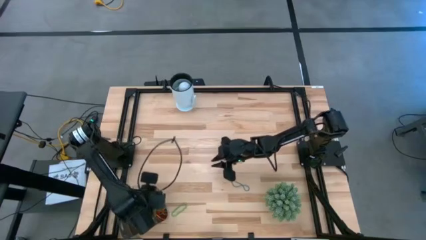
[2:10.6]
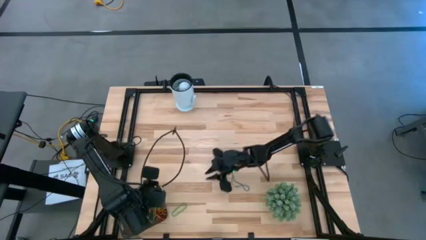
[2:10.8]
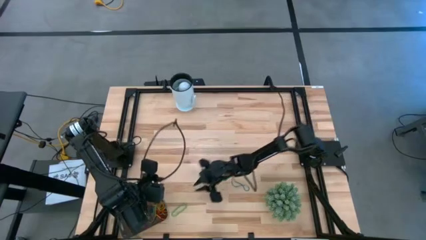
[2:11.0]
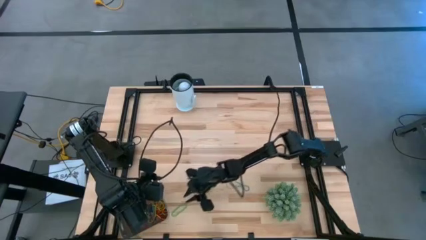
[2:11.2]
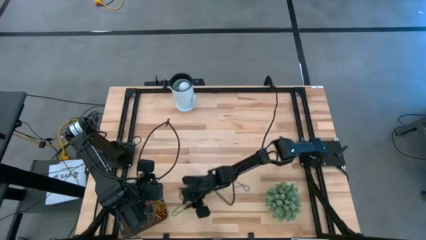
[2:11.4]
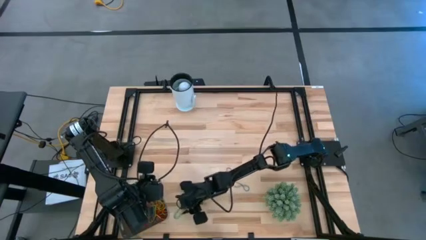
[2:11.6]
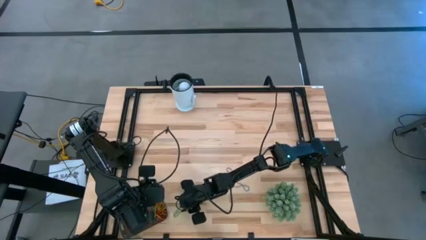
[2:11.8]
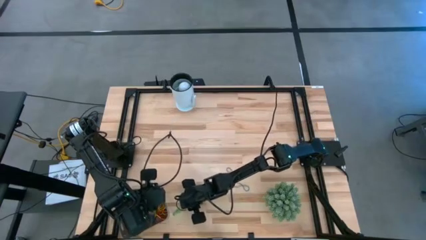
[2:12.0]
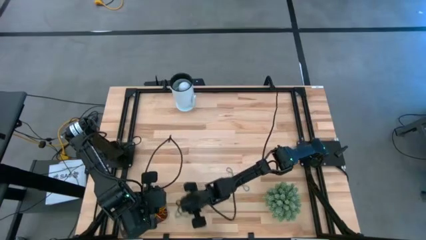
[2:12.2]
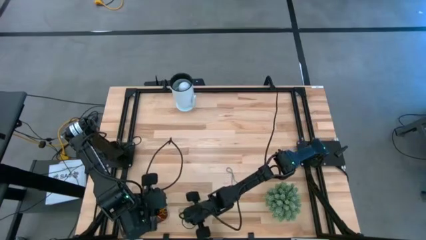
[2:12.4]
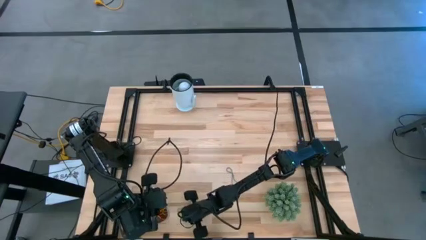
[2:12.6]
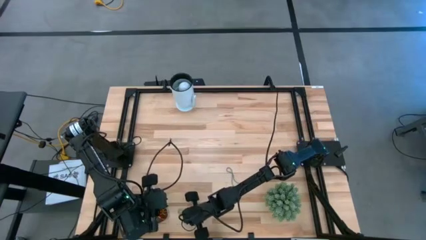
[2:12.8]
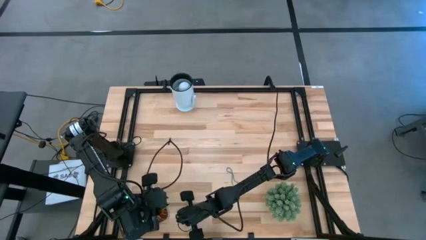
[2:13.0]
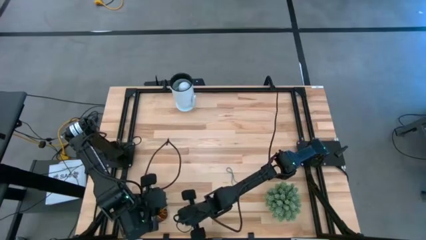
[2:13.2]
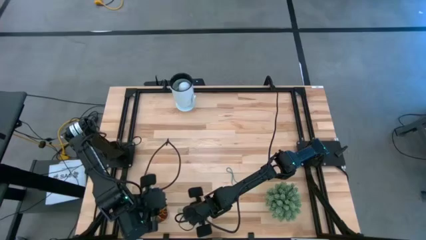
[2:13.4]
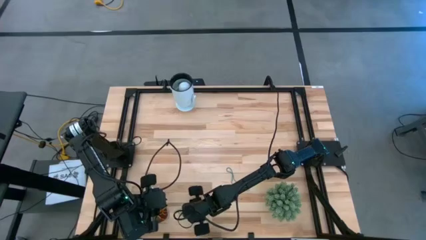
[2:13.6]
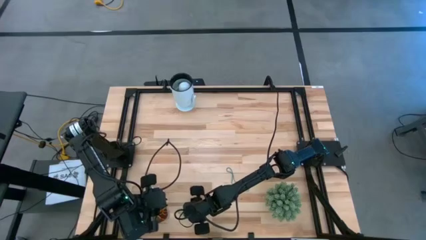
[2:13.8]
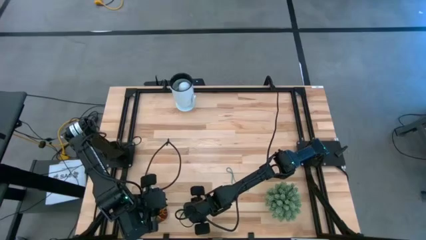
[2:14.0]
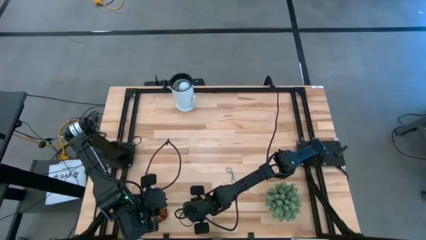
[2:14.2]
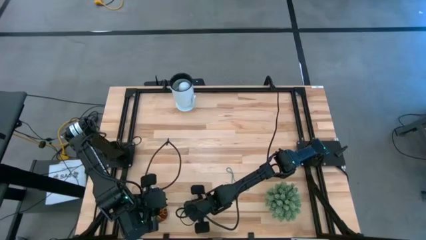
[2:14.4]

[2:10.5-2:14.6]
Task: Pick and place items into bin
Put the green rubber band into the black bin

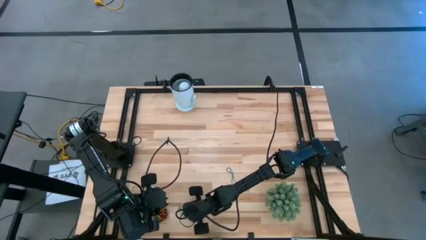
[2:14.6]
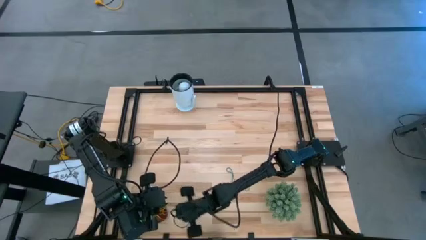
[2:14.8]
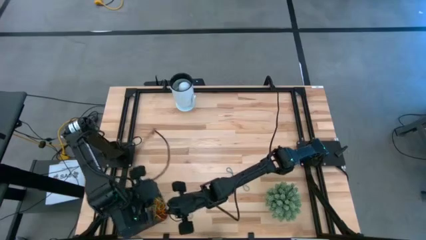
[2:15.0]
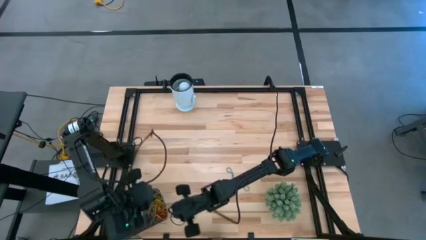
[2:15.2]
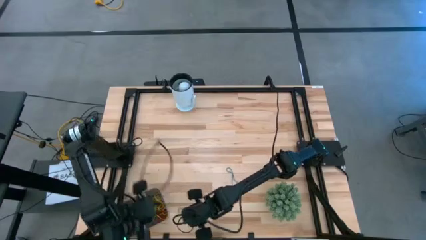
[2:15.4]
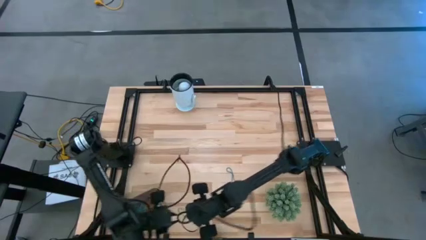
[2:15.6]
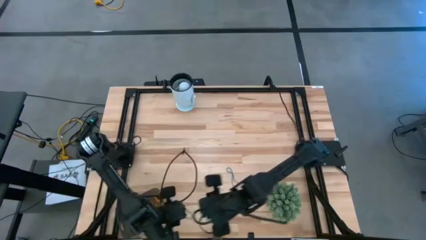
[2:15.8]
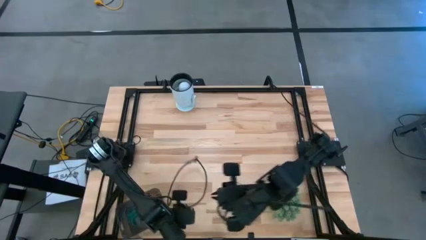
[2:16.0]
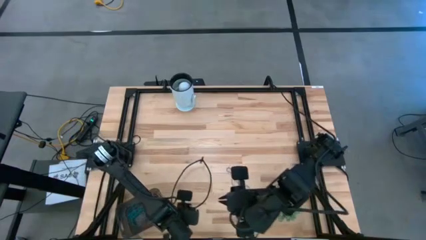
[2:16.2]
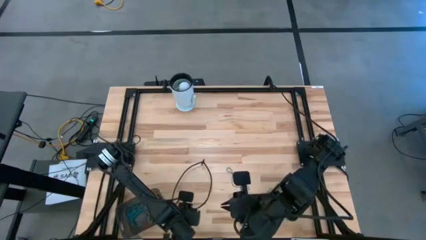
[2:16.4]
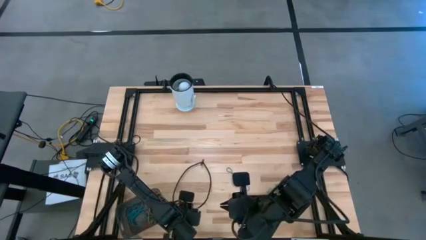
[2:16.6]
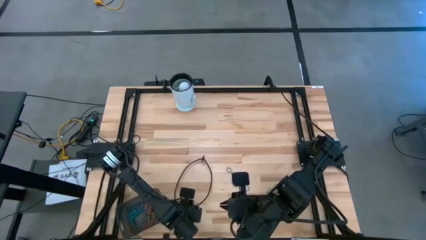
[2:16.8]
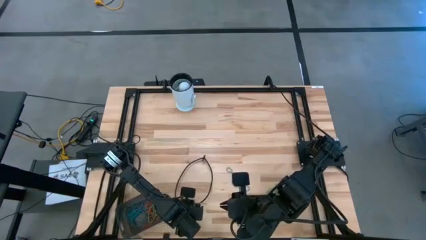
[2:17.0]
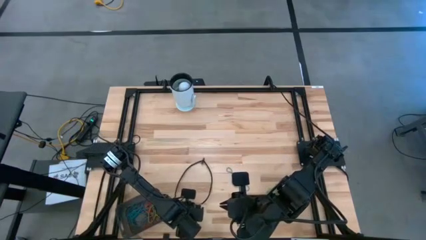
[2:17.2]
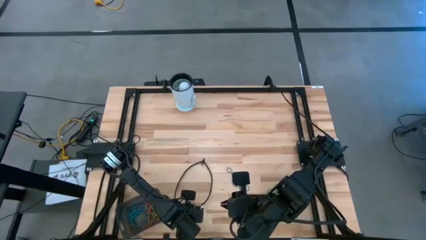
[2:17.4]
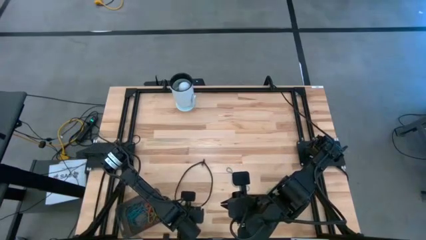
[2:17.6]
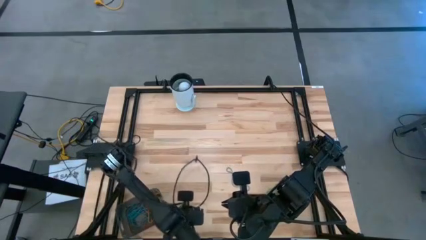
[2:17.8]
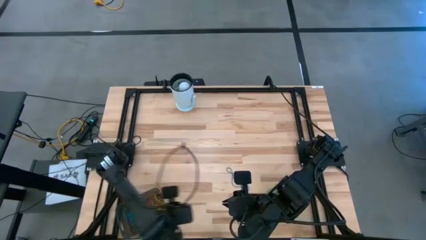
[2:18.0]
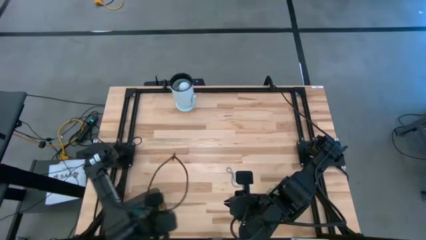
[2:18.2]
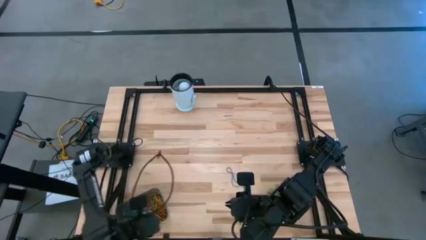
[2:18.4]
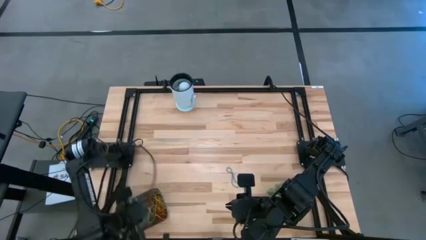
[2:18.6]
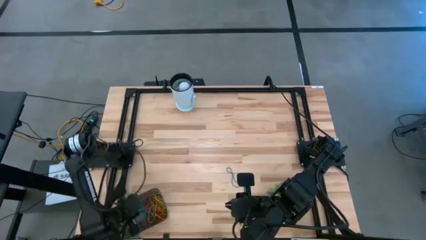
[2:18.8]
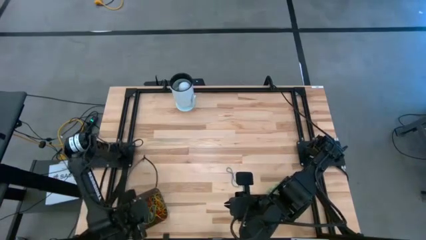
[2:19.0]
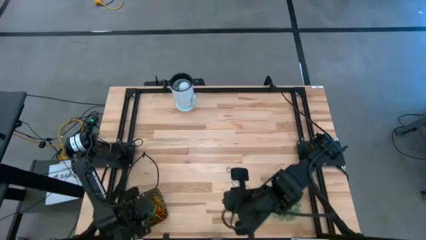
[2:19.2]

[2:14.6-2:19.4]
Put the green rubber band into the black bin

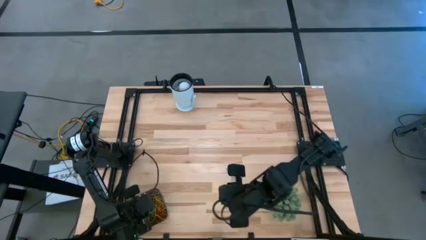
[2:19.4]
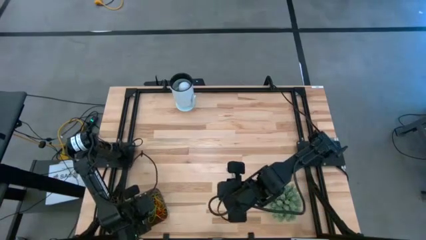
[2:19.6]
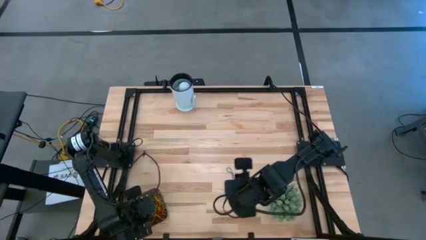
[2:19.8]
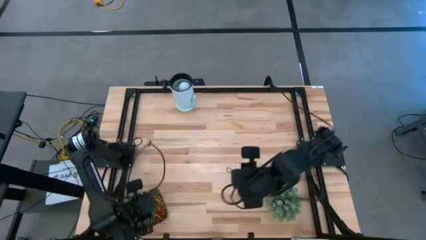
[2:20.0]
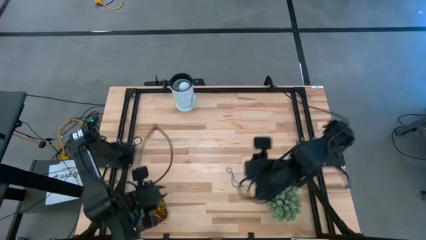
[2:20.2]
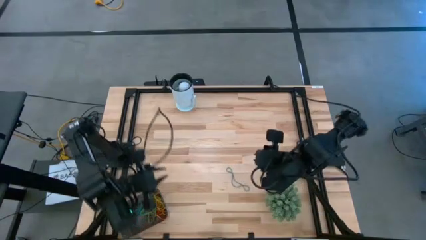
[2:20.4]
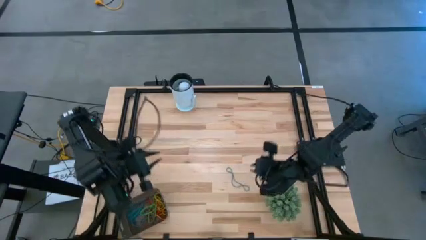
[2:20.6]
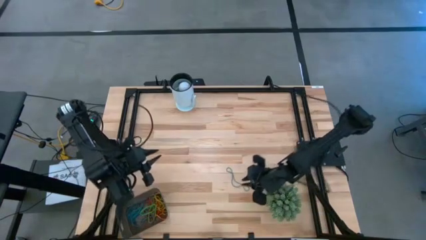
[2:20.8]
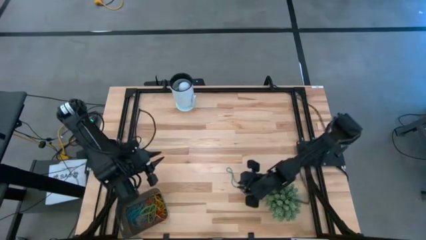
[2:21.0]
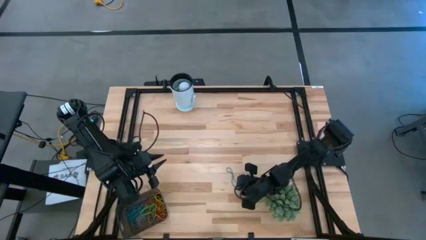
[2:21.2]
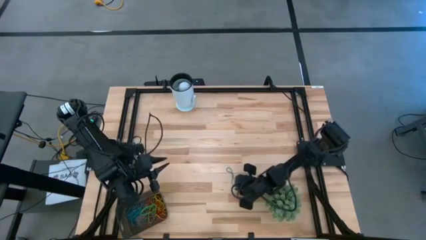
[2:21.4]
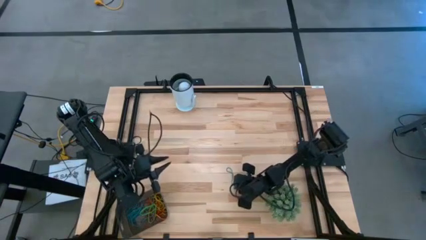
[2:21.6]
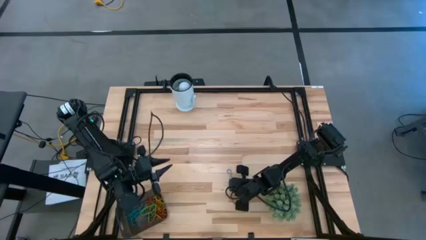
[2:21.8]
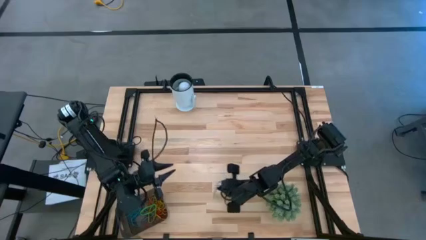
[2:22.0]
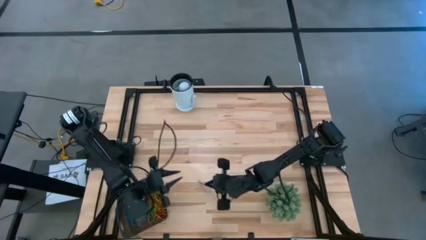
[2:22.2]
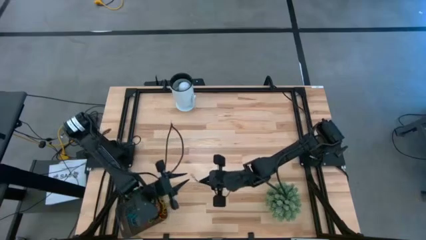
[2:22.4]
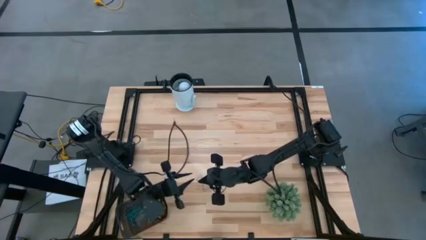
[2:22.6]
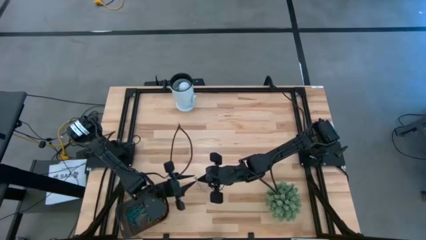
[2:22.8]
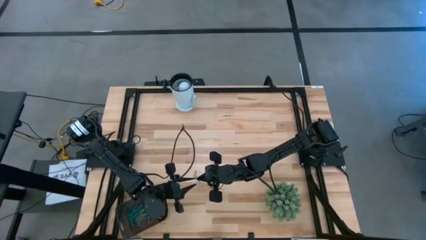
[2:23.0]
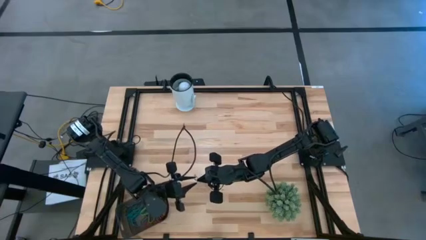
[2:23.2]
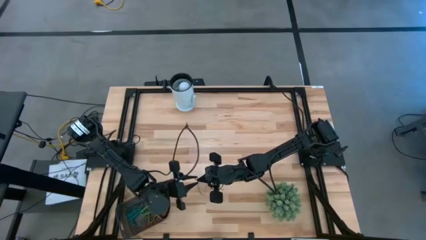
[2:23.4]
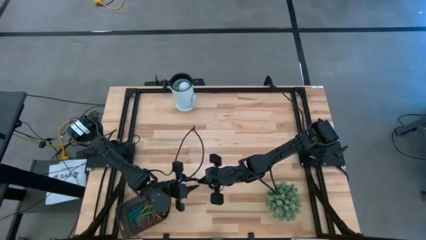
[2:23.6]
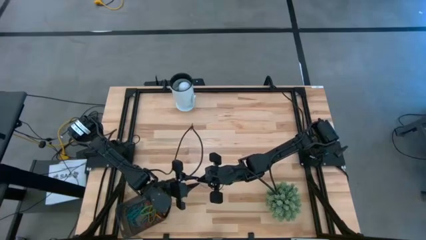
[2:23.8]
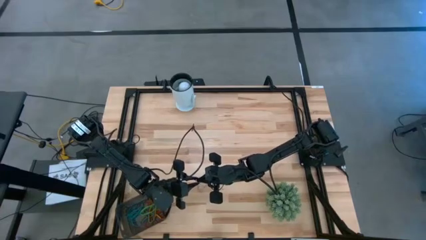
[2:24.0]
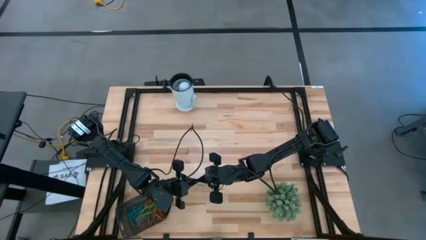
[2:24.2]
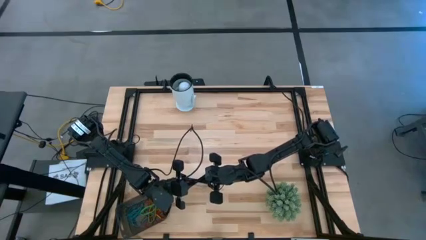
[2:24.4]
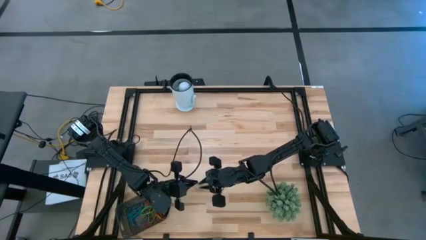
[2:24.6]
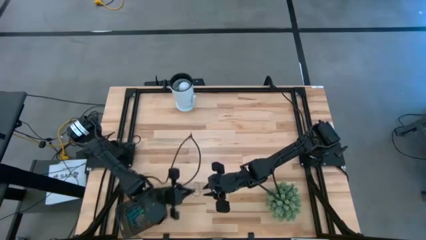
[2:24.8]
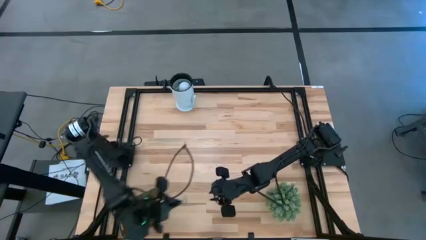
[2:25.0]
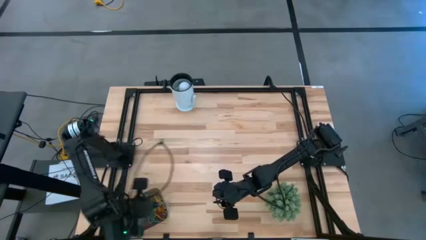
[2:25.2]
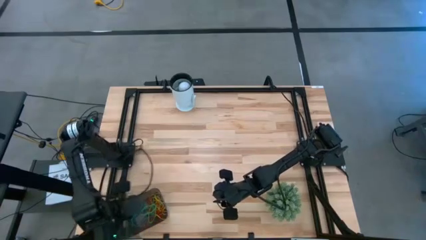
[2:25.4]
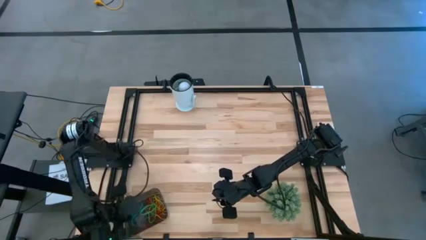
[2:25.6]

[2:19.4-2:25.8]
Put the blue rubber band into the black bin

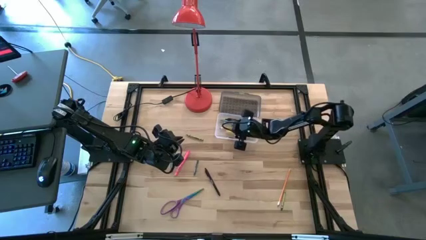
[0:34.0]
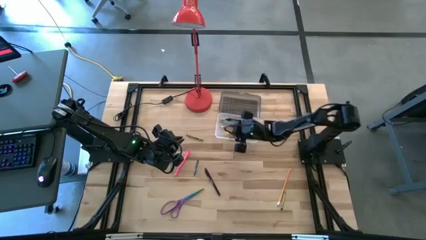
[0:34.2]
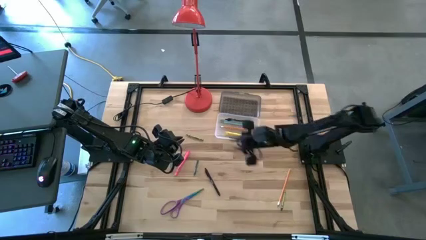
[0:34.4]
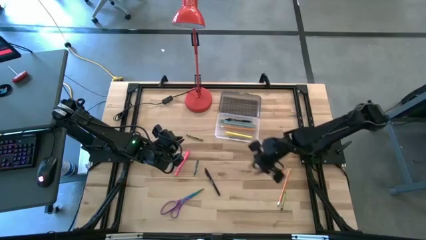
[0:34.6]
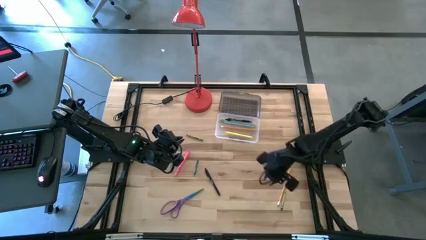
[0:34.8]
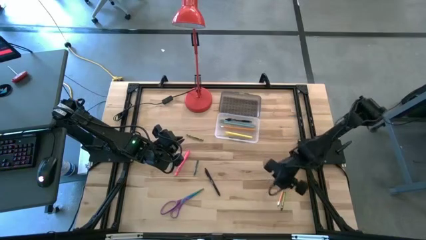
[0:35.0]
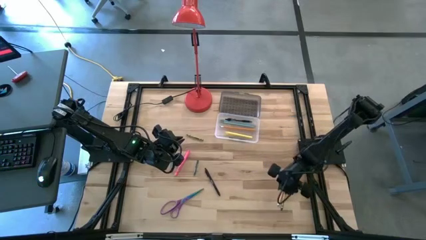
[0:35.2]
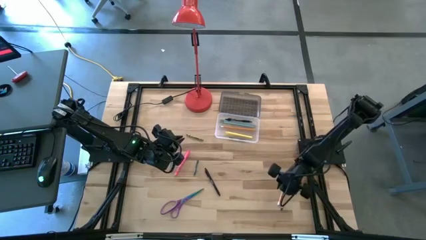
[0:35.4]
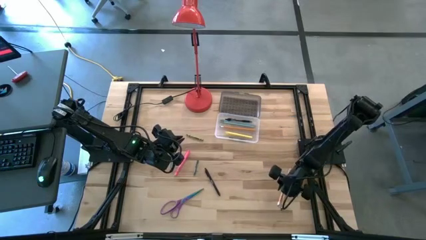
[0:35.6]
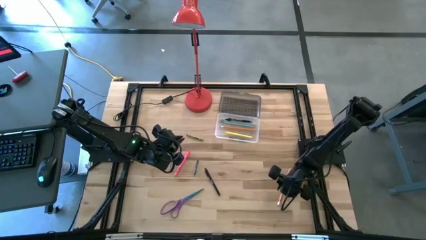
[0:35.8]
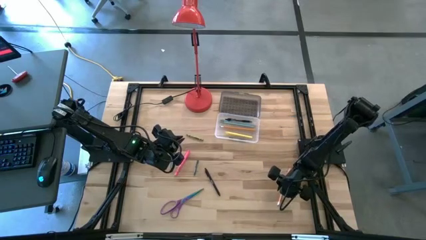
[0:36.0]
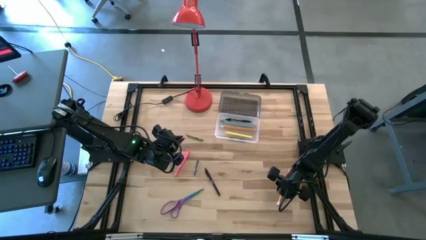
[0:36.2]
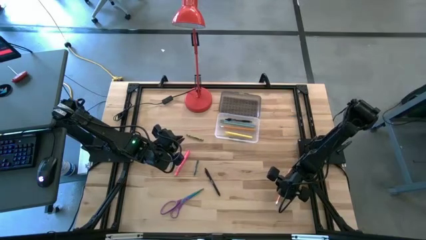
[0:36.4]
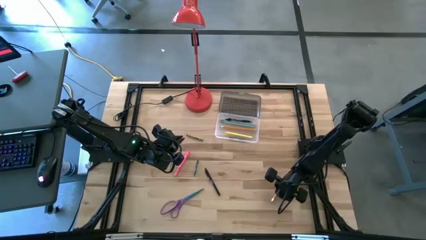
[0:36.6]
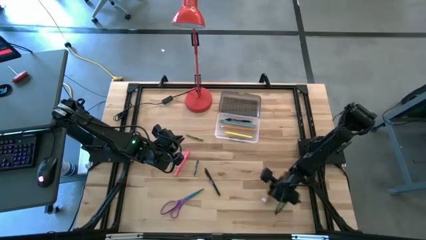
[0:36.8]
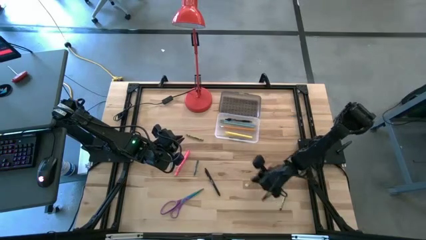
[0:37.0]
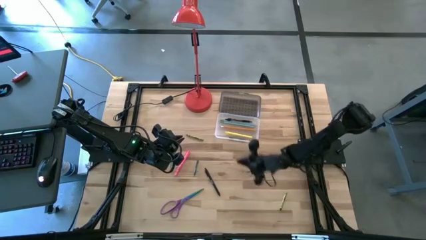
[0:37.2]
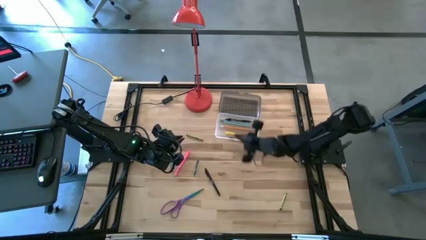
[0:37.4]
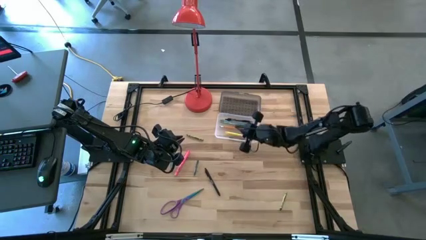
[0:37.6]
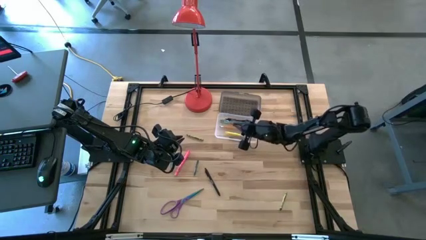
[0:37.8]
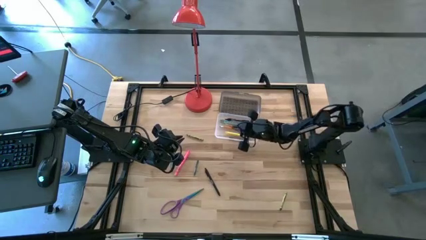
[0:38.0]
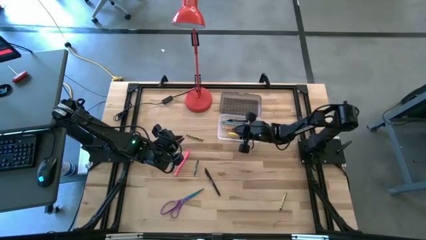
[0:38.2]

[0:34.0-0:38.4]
Task: Pick & place school supplies into a supply box
Put the orange pencil into the black supply box
